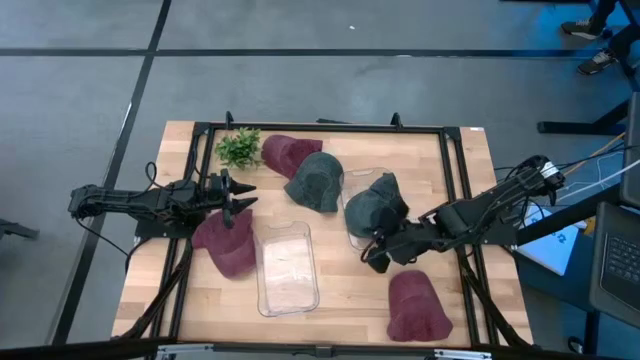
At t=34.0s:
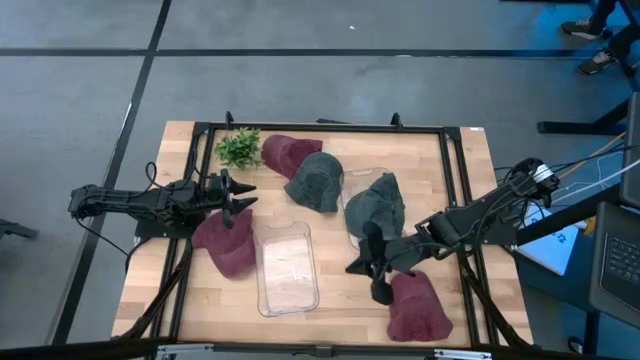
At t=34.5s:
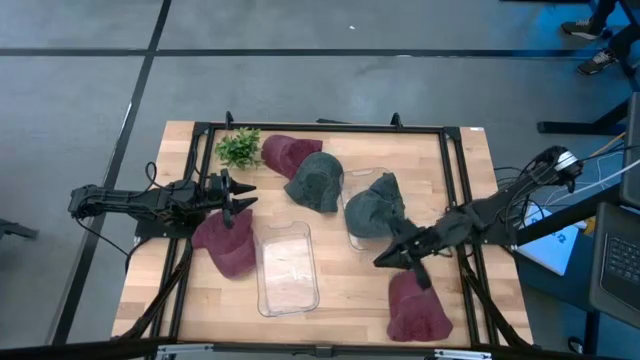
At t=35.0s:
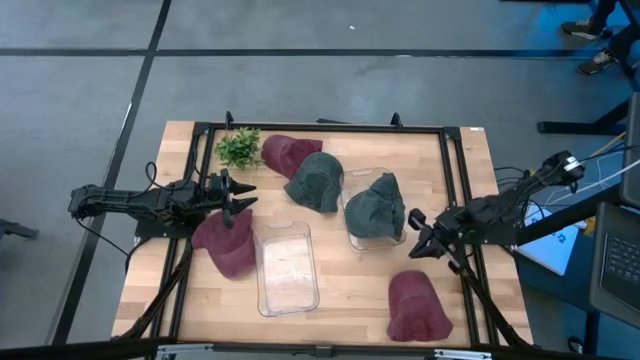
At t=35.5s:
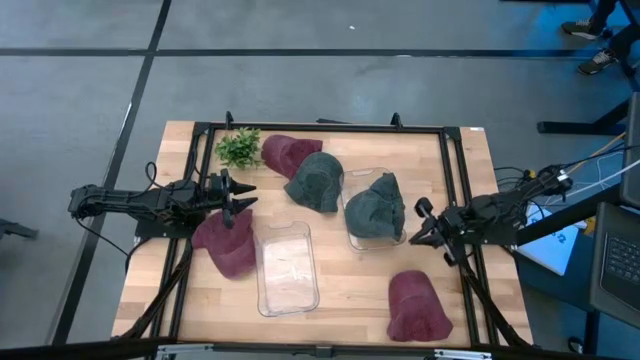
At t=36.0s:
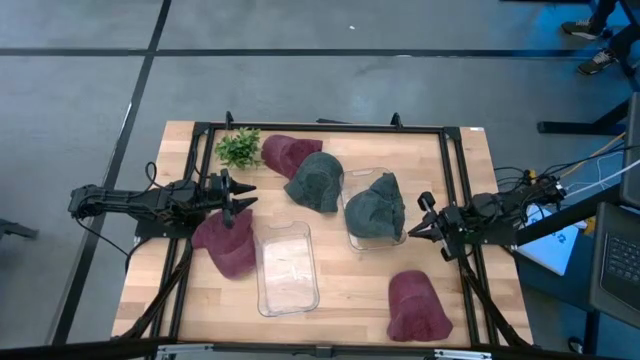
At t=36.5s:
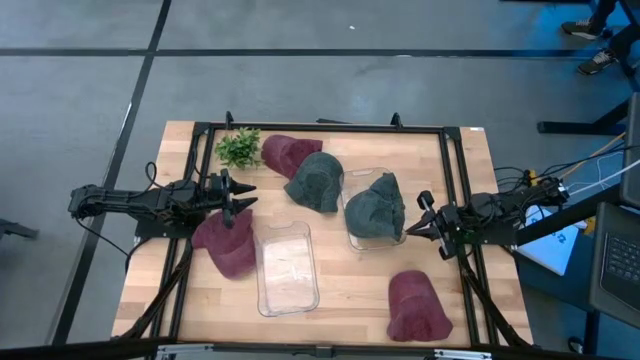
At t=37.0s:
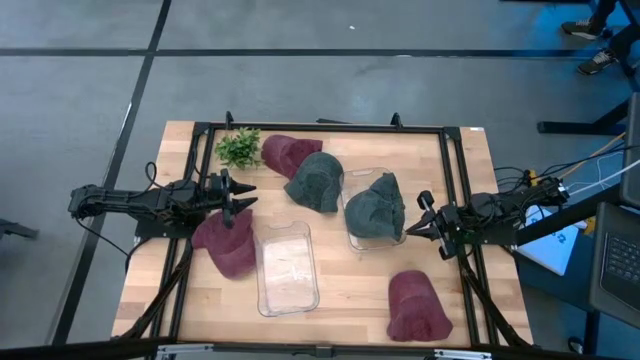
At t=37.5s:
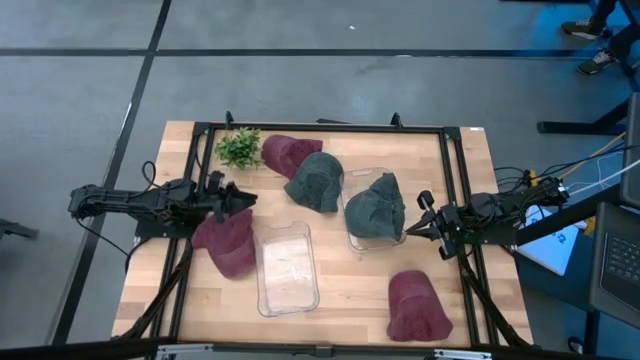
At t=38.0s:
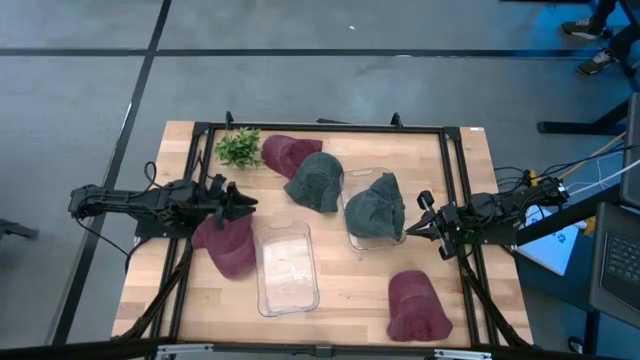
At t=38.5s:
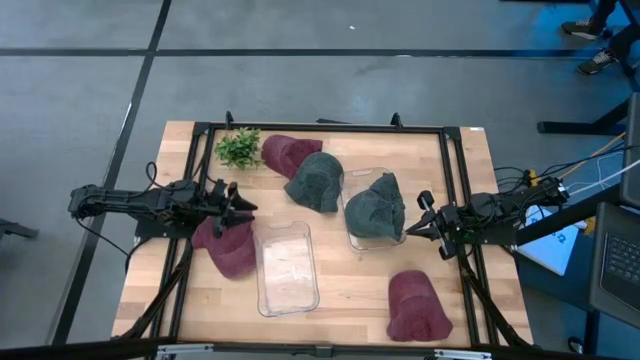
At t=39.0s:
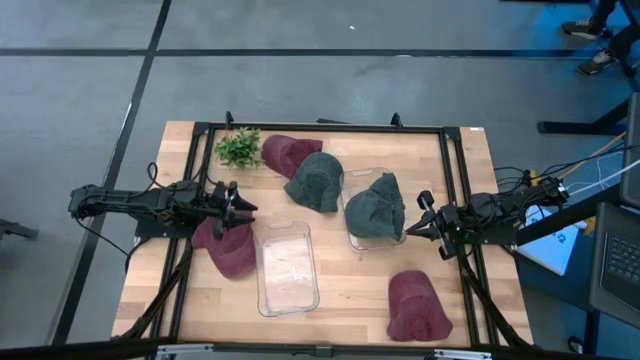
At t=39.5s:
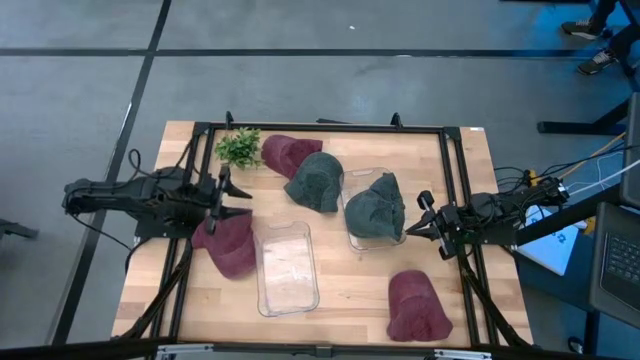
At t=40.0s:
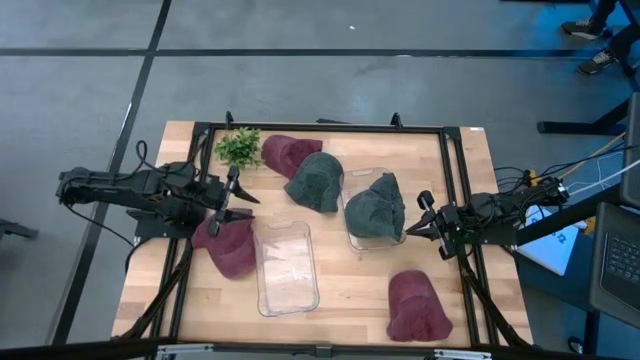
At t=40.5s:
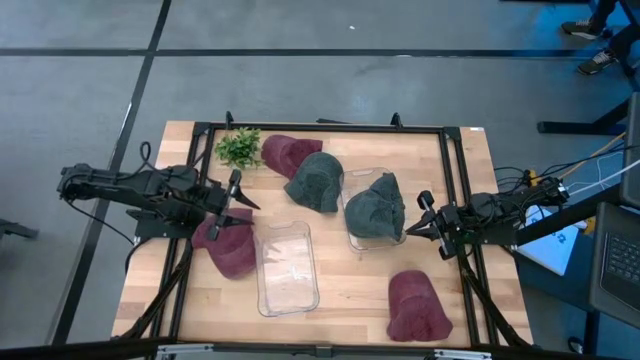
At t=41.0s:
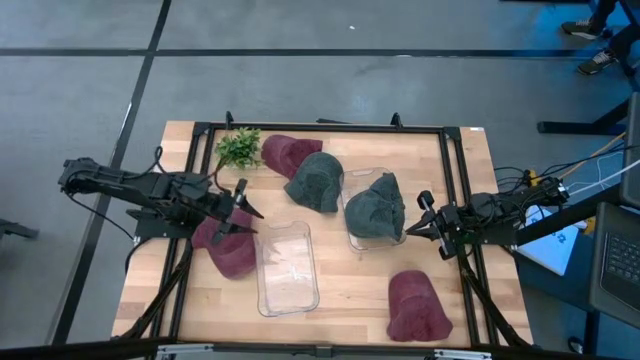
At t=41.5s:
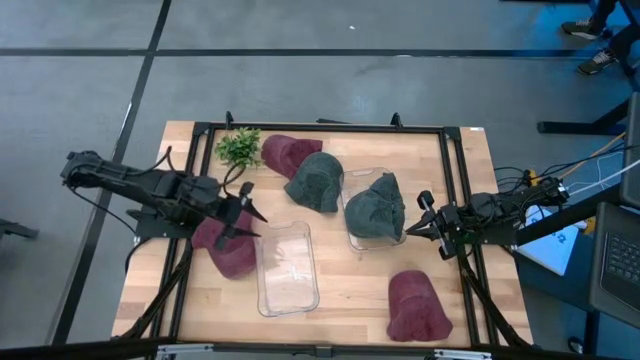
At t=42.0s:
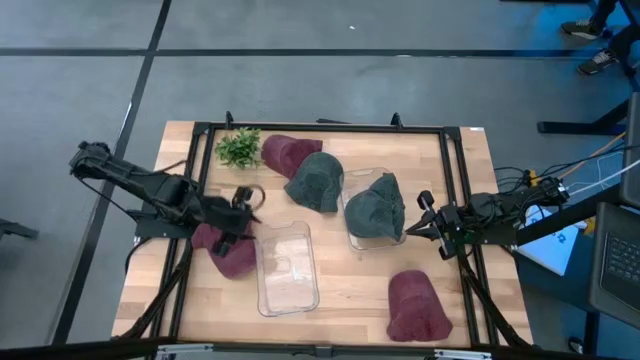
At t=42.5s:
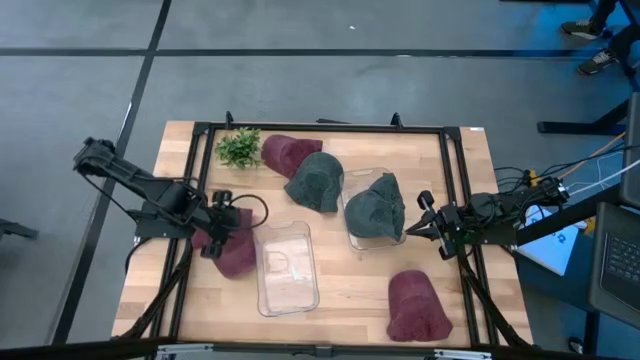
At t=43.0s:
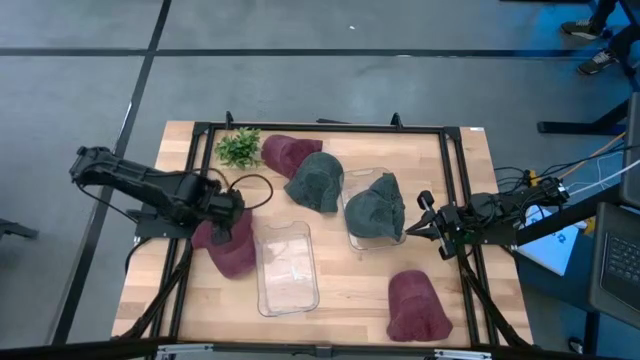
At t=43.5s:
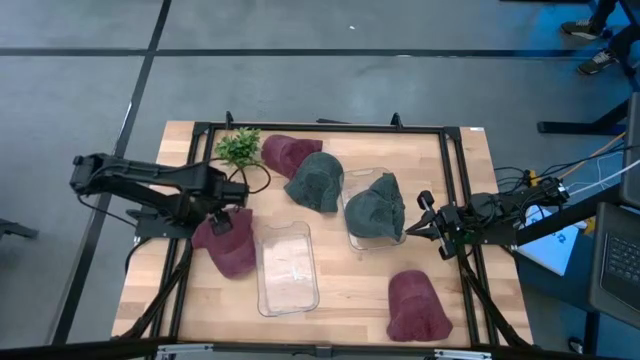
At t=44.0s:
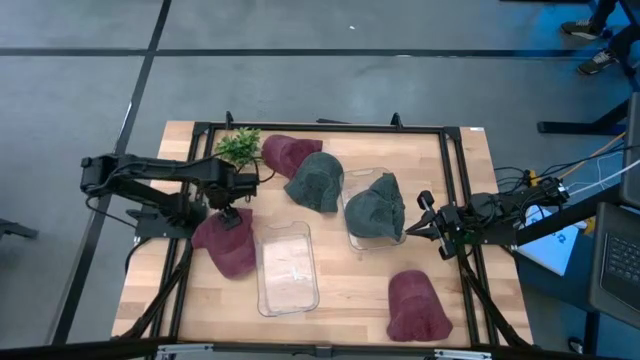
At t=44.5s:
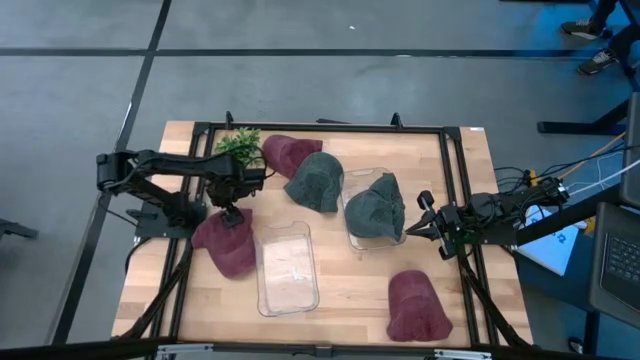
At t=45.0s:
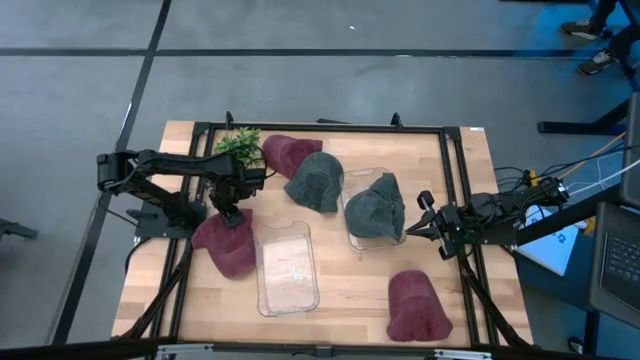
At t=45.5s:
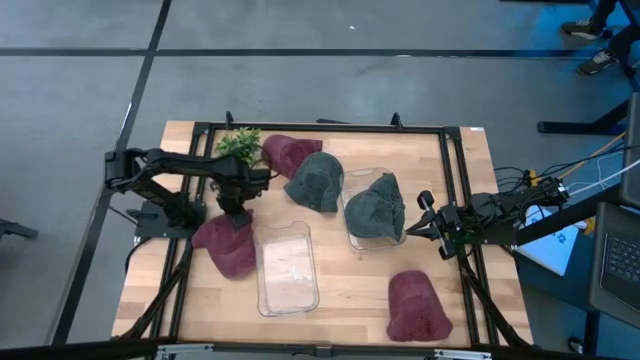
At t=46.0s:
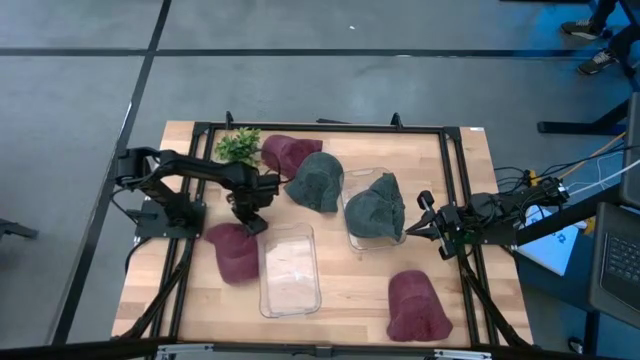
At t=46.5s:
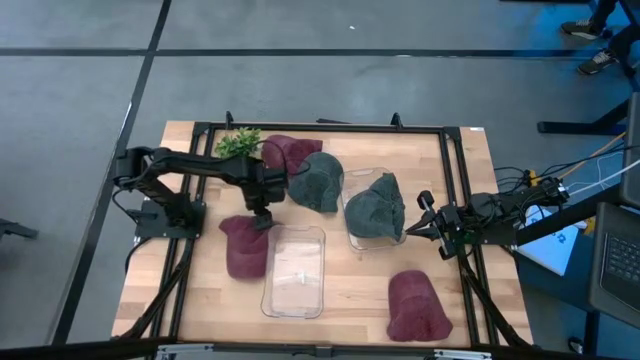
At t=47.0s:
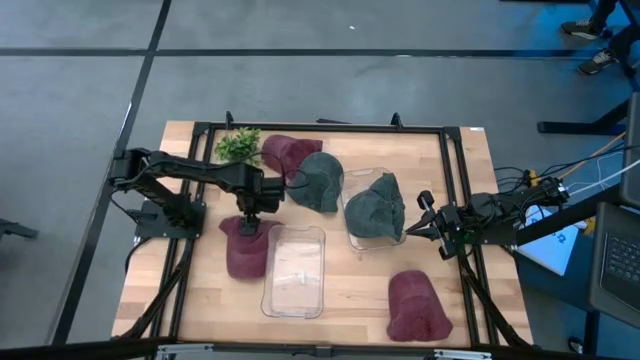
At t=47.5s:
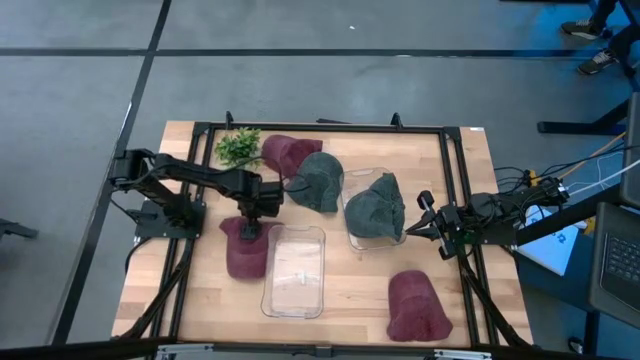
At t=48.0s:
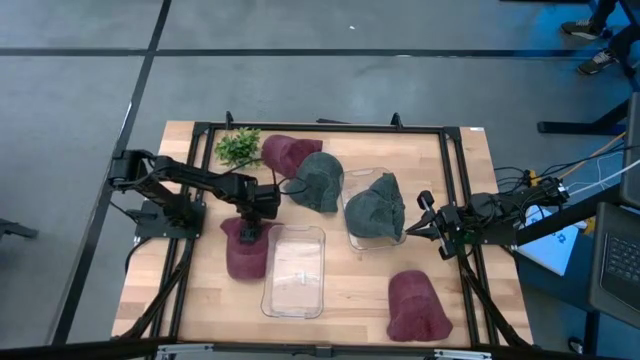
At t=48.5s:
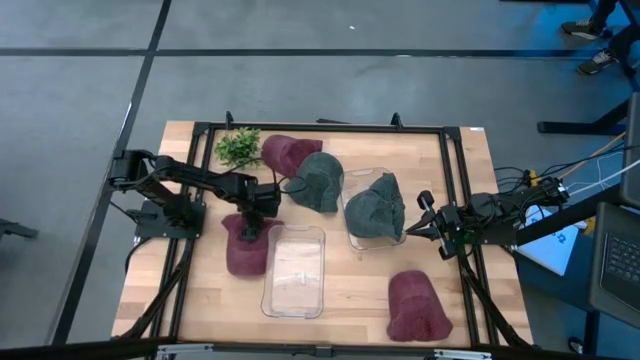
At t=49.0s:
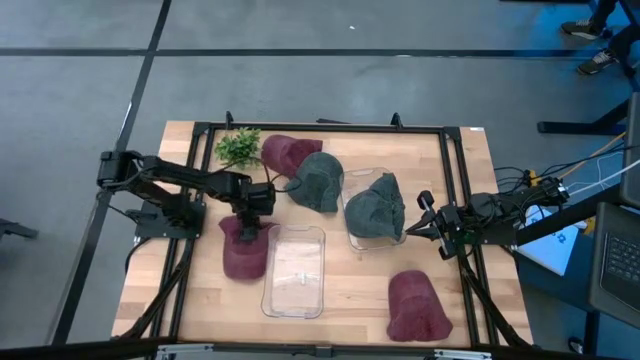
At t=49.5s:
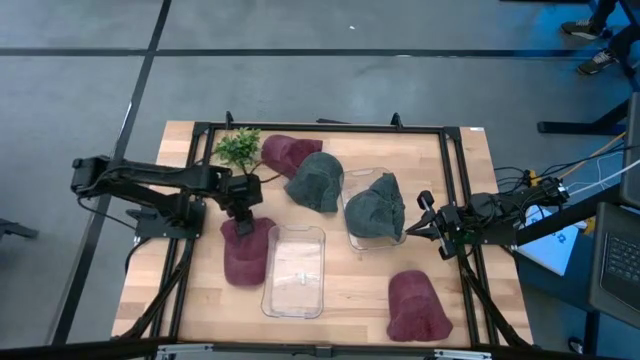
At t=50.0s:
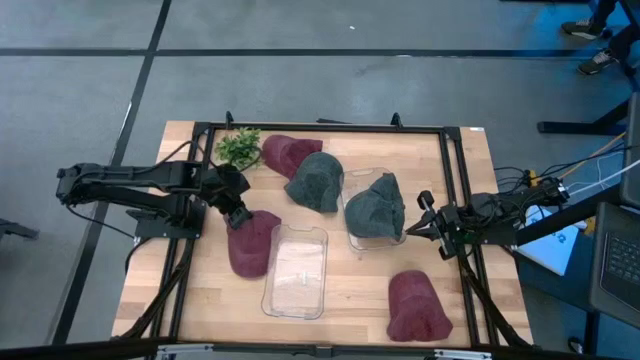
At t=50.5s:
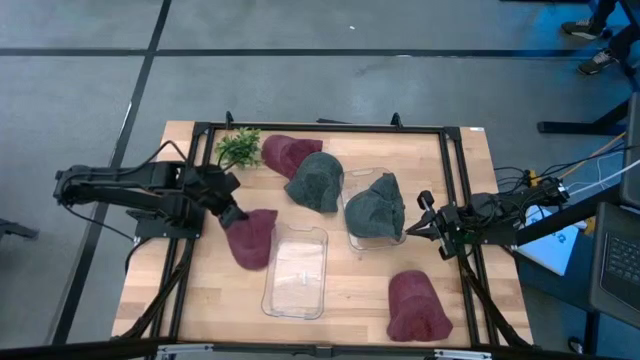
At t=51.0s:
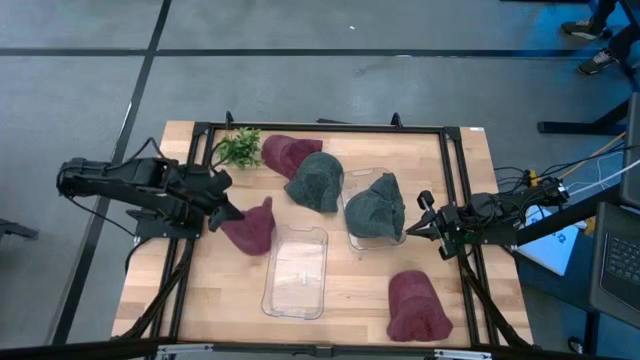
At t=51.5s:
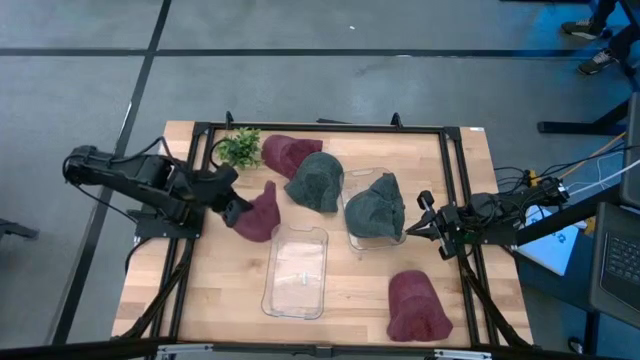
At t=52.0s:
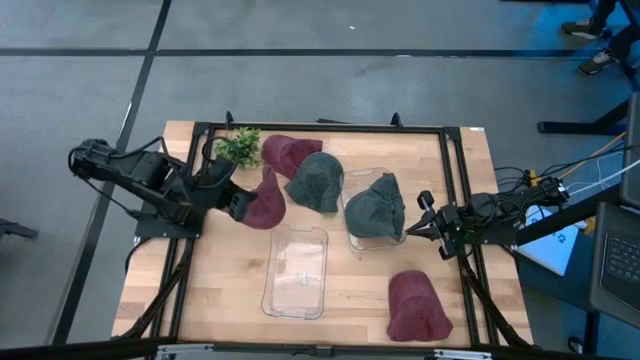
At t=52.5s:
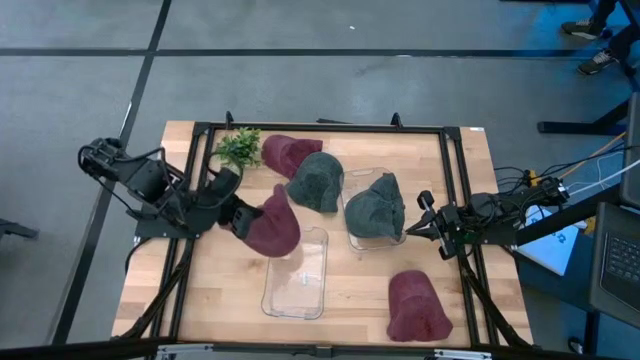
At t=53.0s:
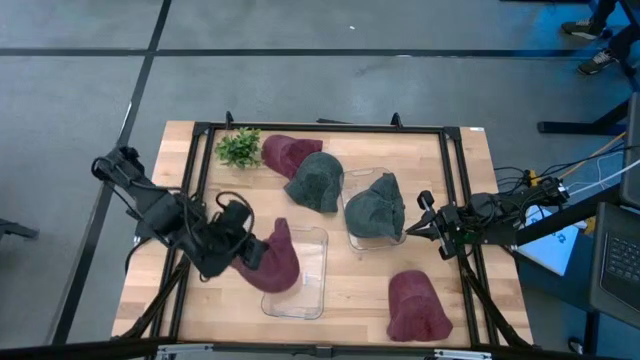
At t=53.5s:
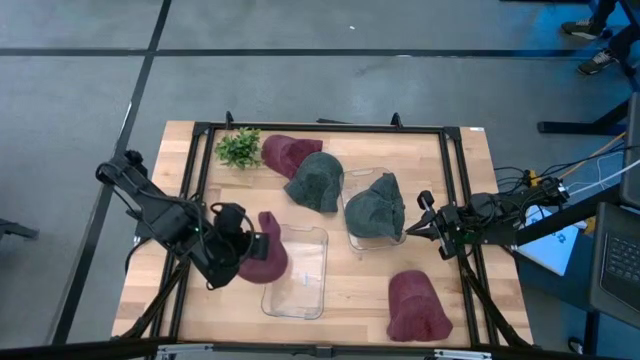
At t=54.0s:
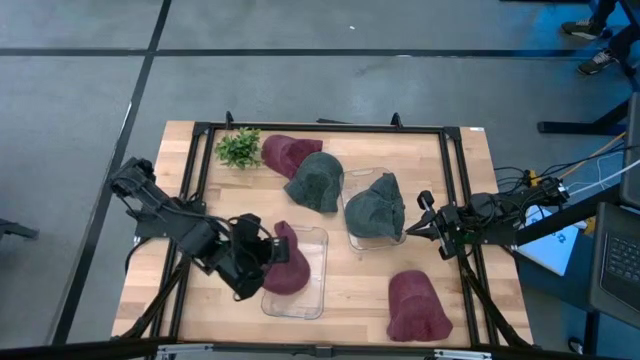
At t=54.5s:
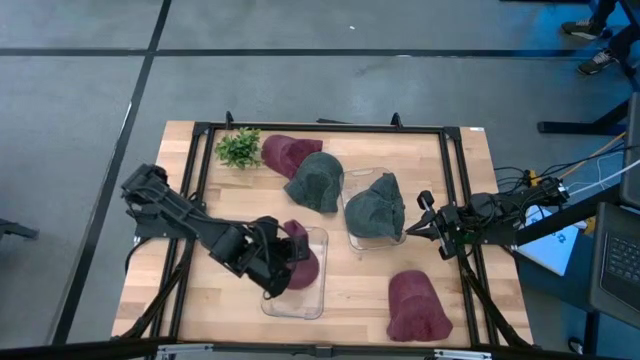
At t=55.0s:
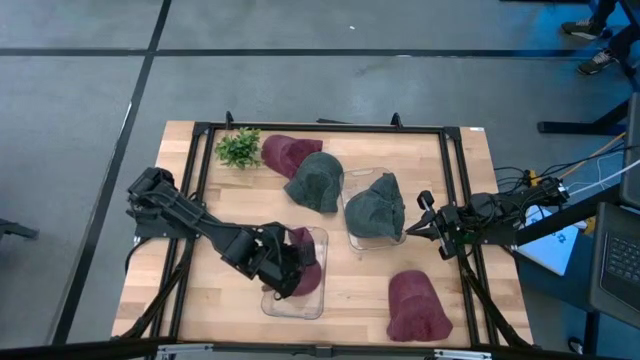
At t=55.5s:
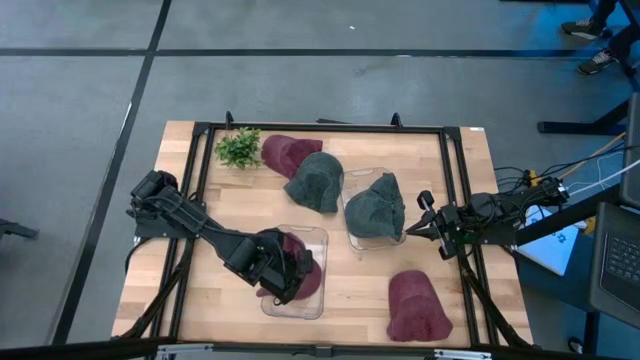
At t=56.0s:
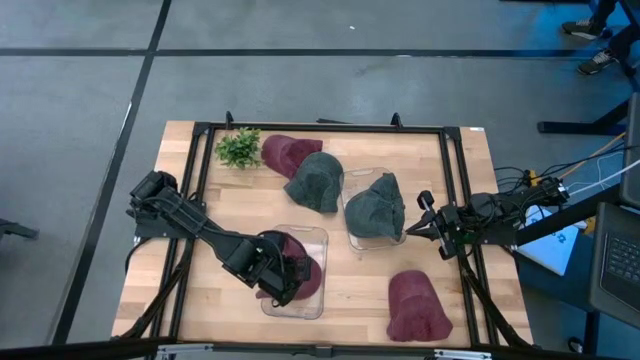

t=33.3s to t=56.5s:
Task: Pick & Place hat
Put the bottom left red cap into the left transparent bin
